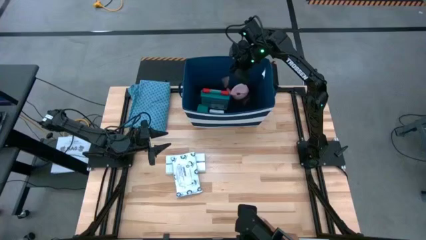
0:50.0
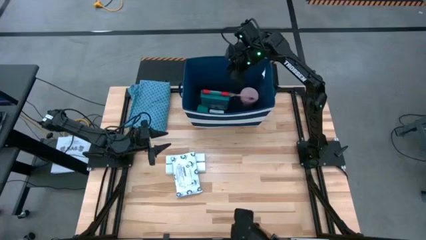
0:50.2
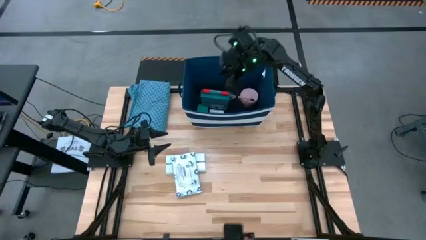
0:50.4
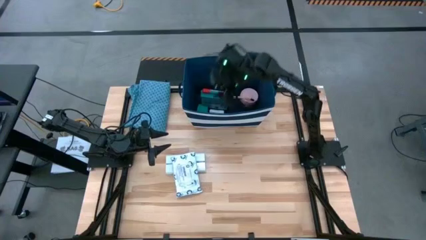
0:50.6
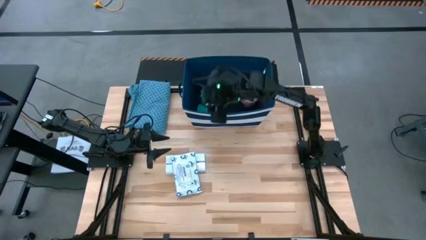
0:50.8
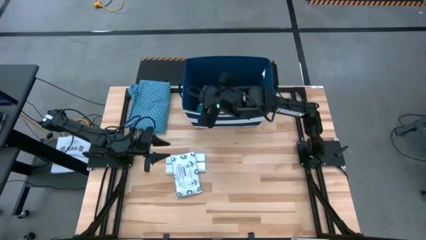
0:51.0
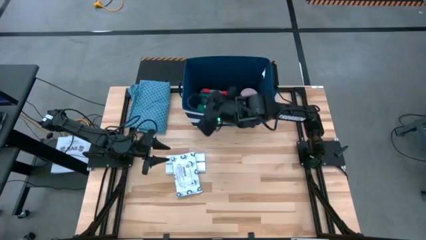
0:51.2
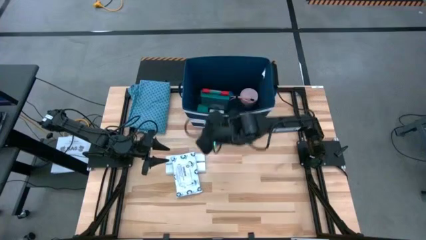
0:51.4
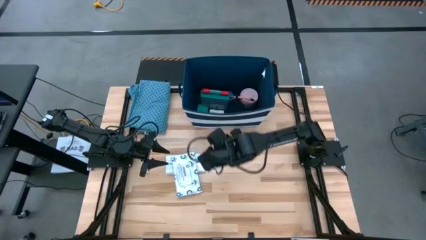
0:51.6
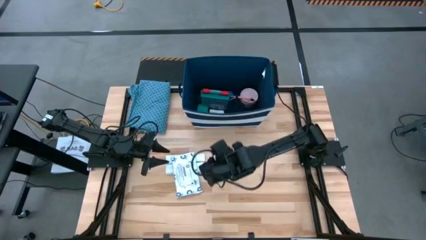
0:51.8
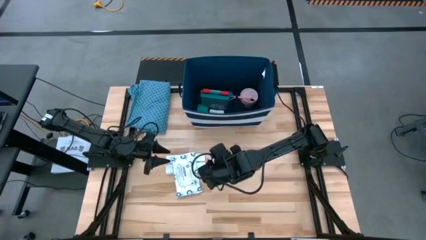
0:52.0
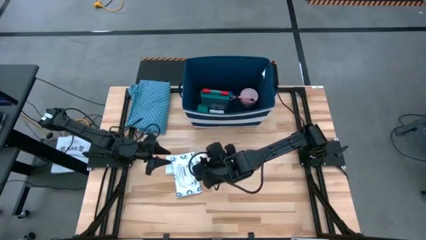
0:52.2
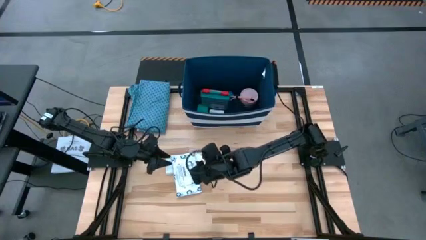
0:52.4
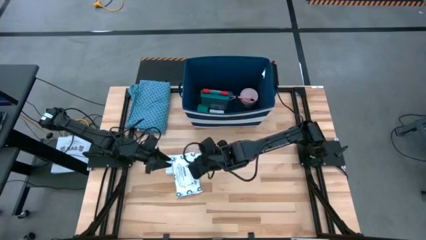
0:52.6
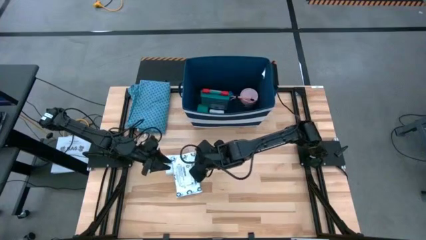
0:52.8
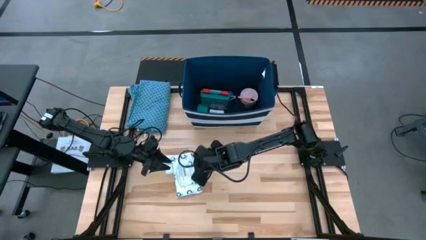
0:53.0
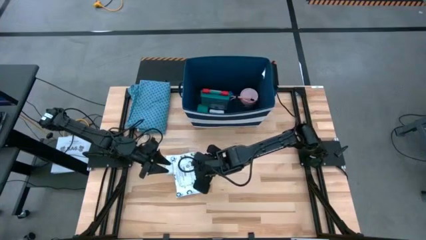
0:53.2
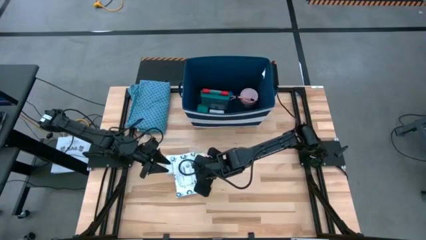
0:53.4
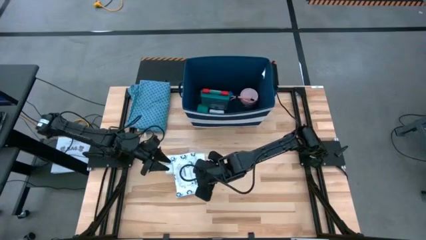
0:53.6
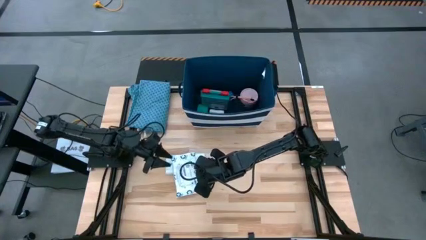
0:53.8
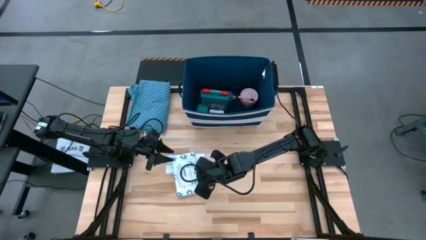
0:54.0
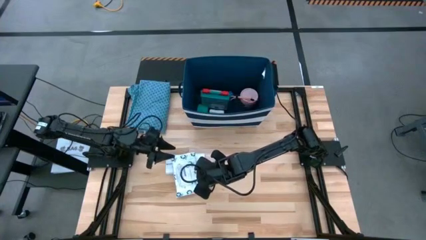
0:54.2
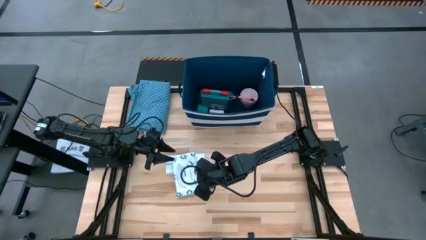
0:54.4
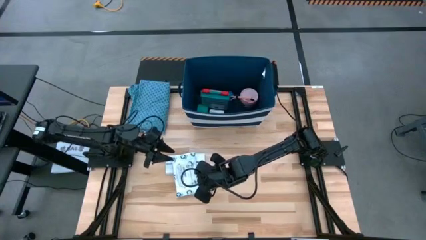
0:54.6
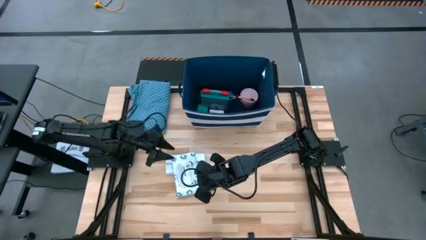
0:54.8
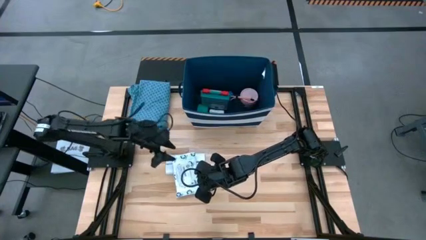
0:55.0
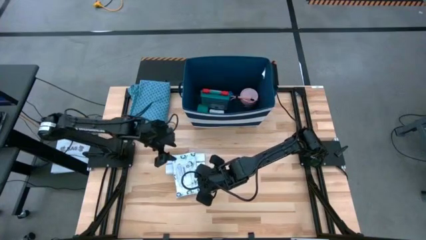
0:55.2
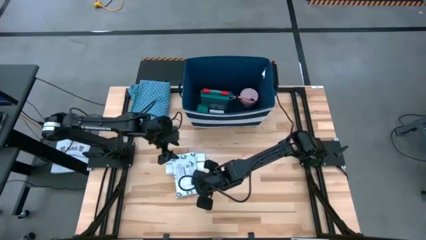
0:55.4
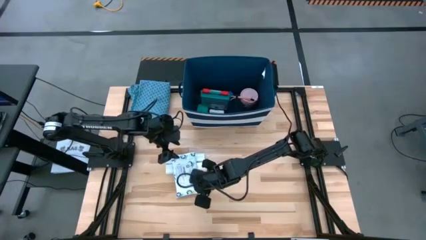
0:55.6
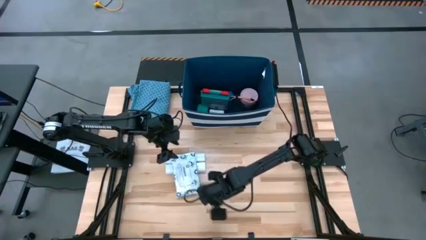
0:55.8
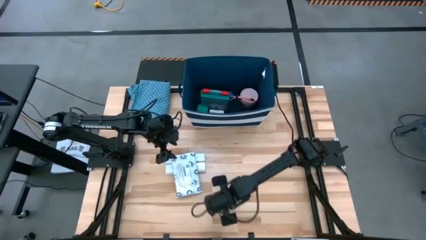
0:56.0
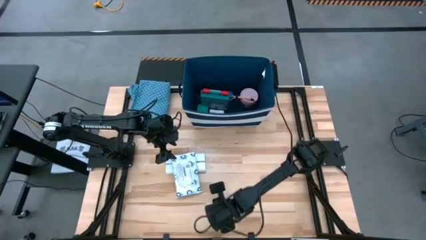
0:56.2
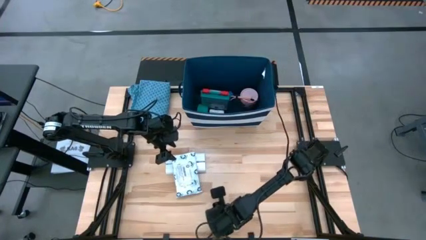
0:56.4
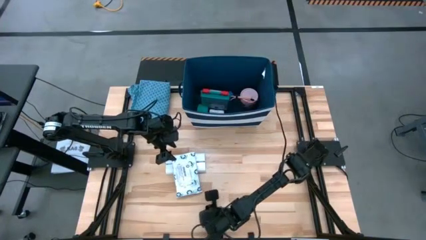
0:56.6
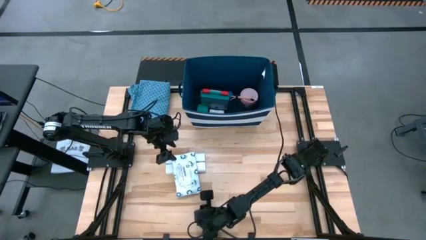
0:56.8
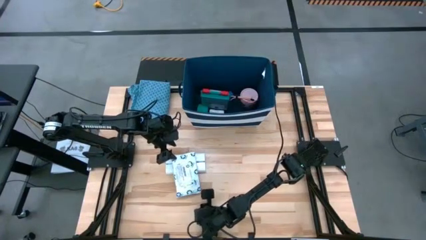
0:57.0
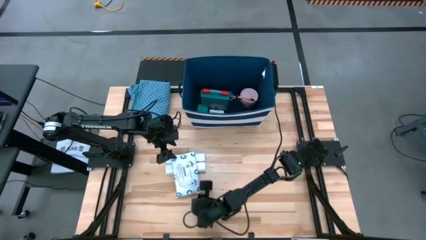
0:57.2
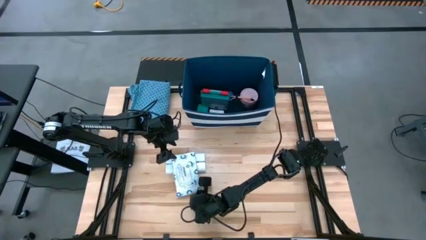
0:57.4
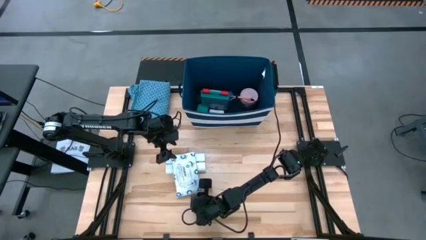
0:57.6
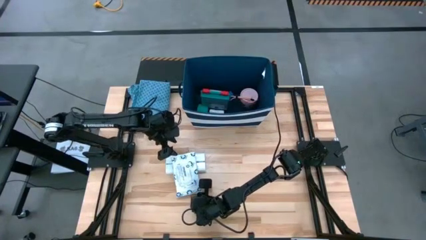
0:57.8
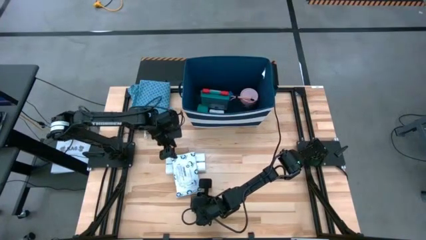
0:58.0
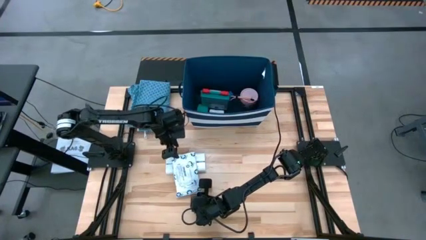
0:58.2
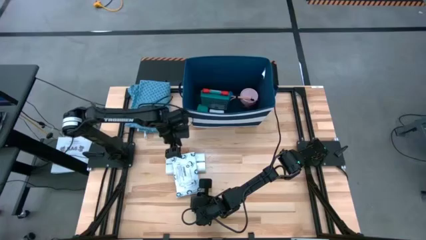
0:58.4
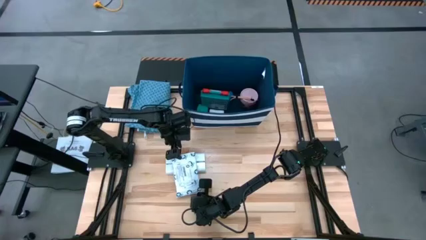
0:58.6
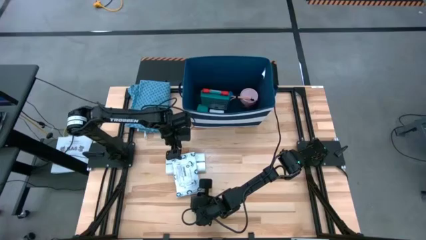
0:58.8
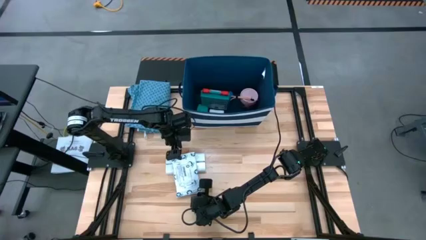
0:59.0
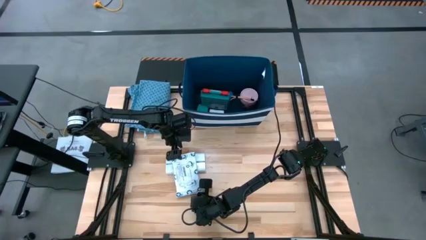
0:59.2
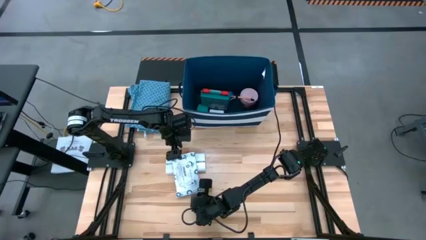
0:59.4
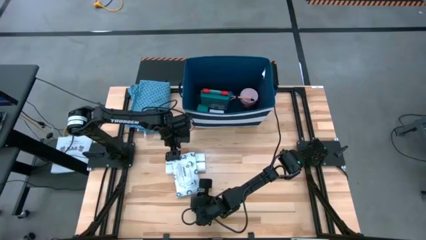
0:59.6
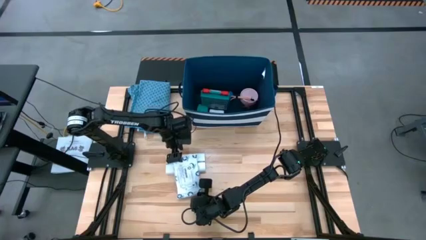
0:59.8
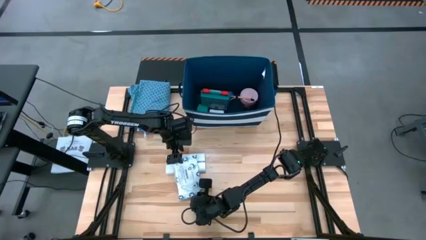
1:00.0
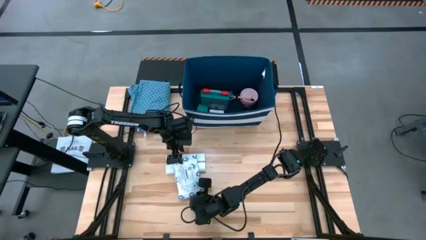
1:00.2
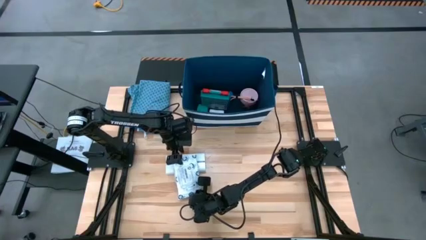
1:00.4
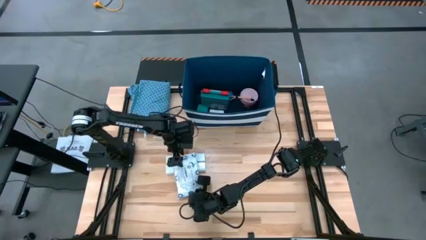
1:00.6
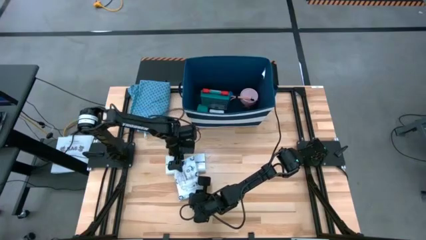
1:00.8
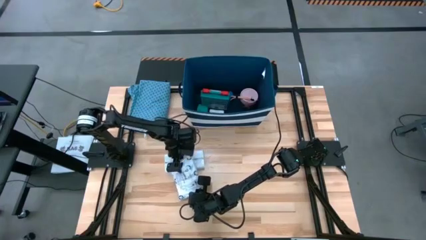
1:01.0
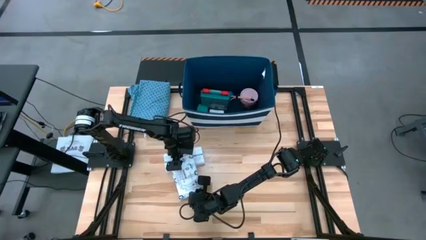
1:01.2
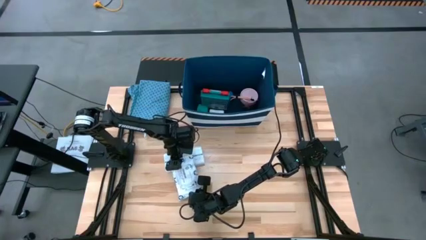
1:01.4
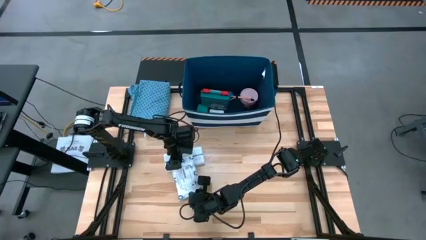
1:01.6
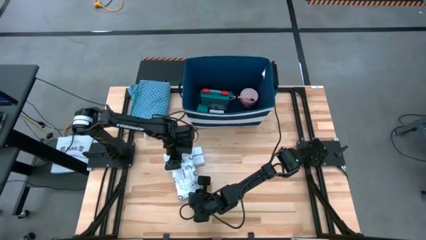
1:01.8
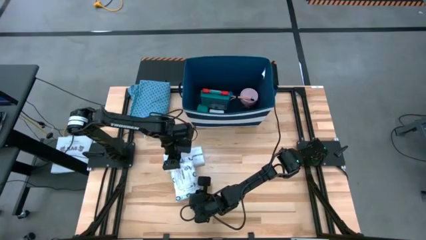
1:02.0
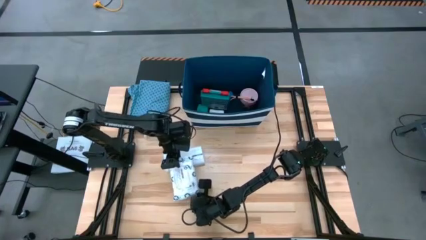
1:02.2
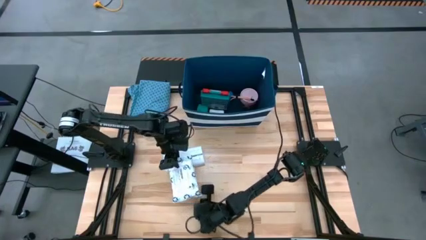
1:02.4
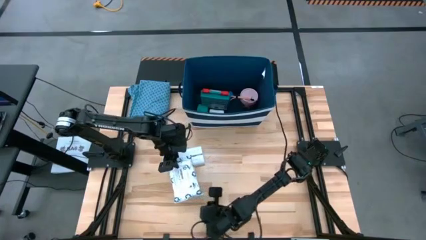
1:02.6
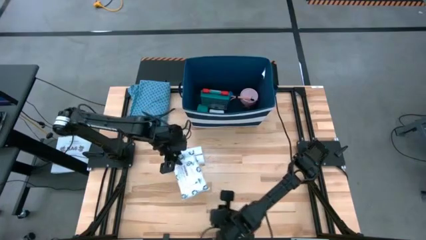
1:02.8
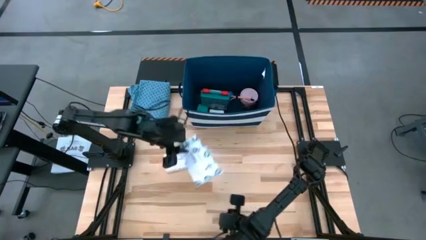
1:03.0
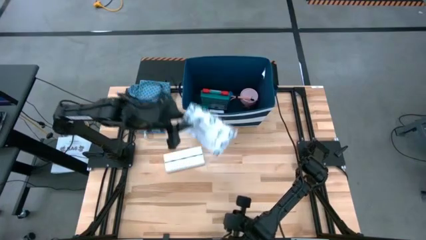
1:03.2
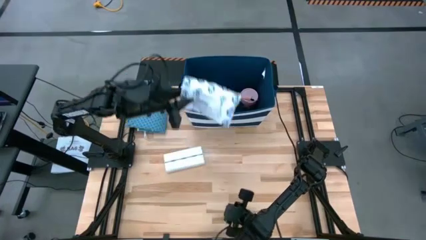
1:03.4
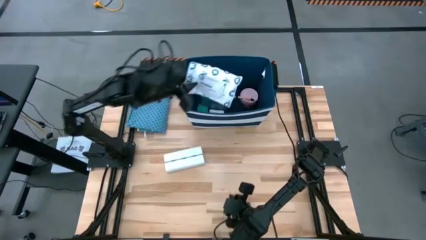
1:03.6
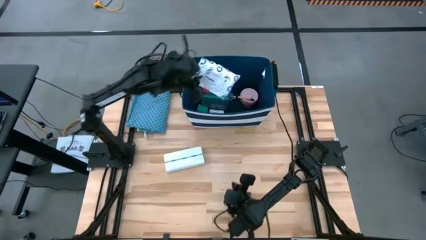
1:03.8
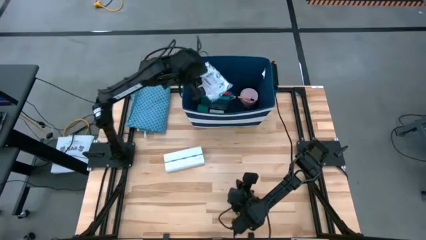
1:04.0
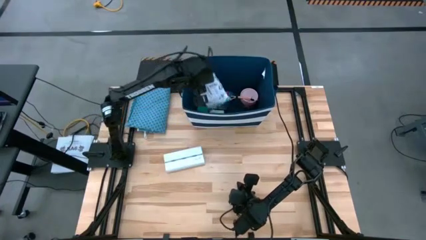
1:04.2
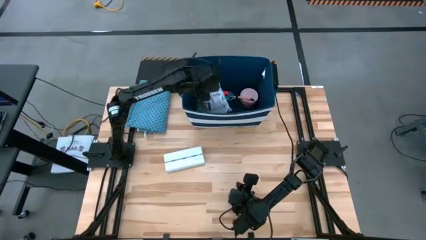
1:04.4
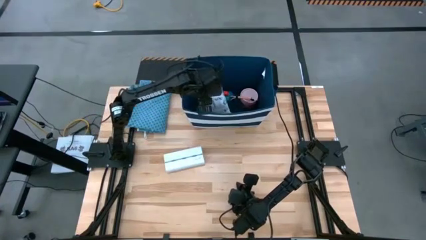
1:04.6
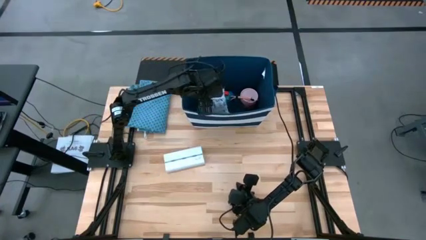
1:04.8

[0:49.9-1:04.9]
Task: Pick & place medical supplies in basket/bin
Put the white mailer bag into the blue bin
